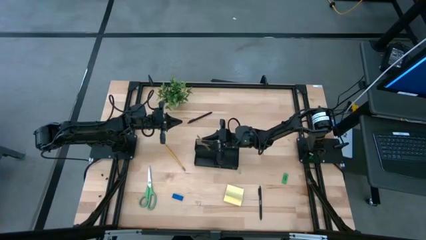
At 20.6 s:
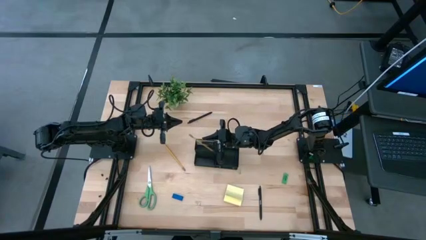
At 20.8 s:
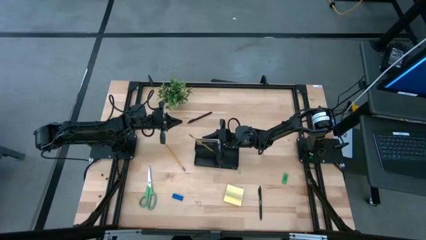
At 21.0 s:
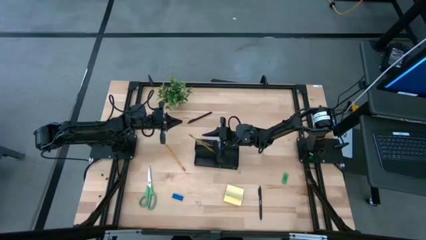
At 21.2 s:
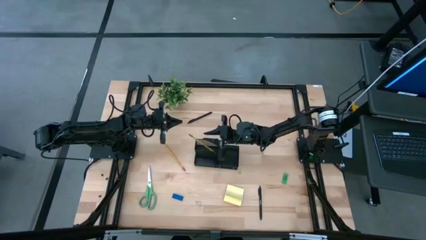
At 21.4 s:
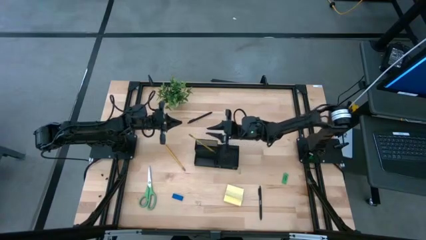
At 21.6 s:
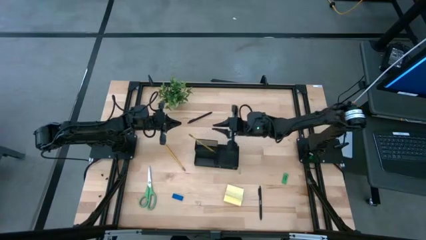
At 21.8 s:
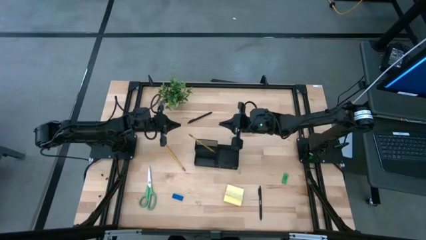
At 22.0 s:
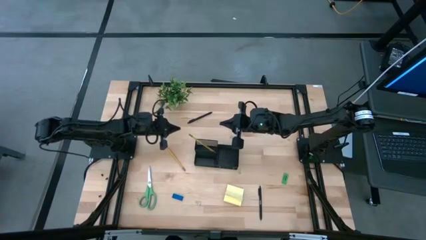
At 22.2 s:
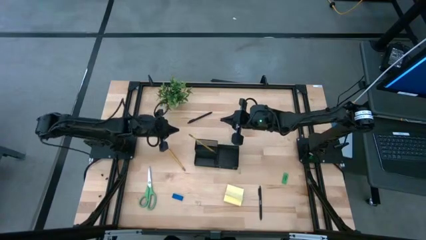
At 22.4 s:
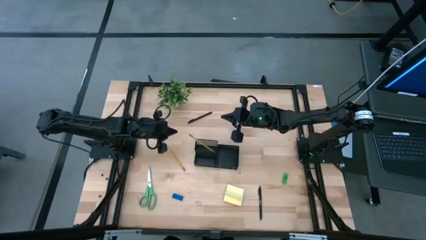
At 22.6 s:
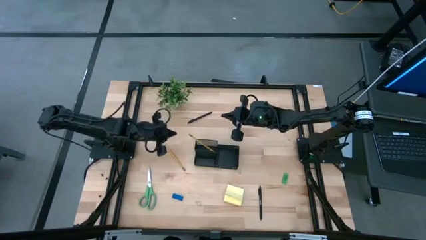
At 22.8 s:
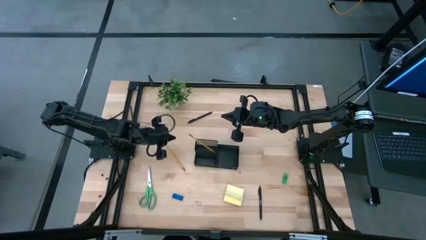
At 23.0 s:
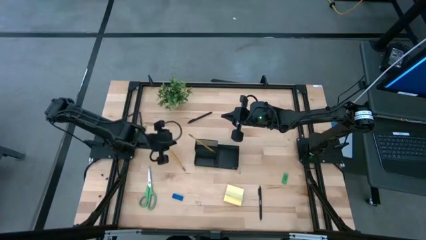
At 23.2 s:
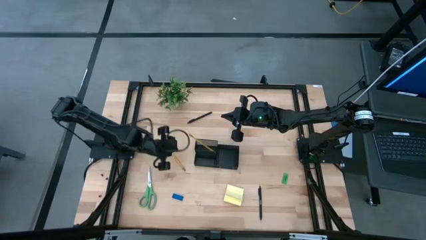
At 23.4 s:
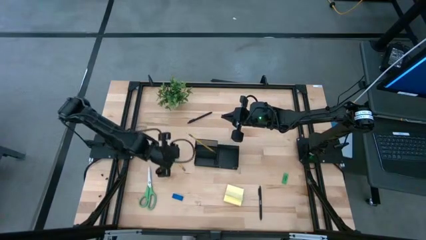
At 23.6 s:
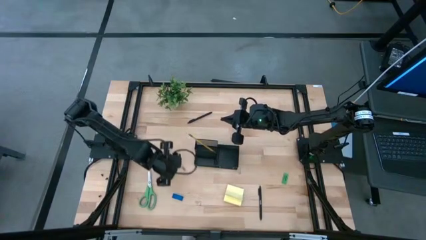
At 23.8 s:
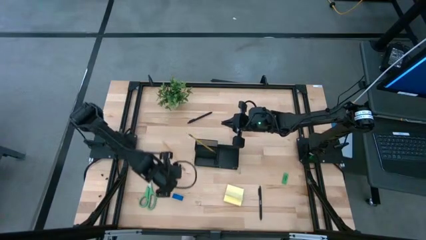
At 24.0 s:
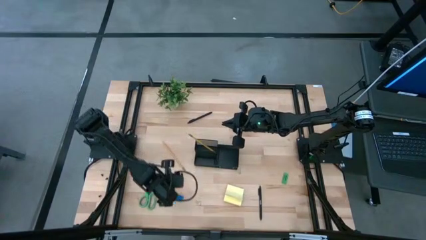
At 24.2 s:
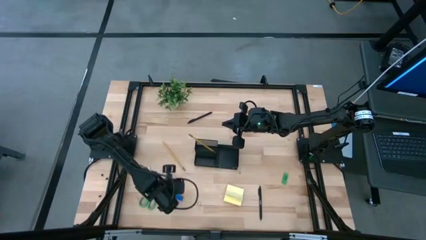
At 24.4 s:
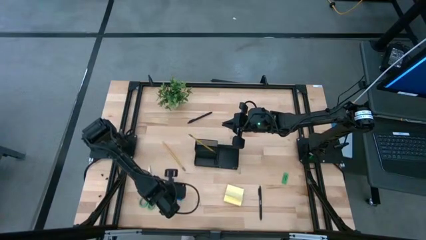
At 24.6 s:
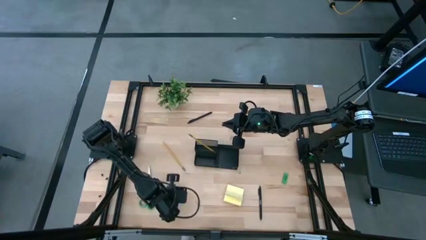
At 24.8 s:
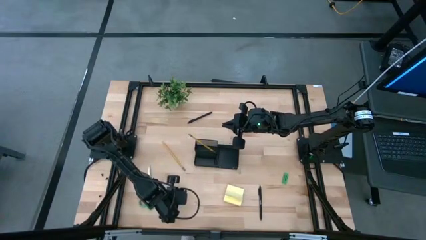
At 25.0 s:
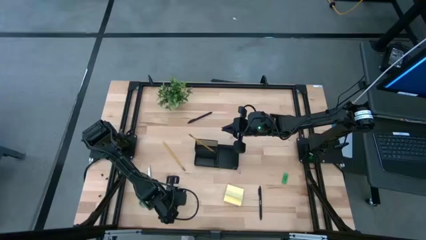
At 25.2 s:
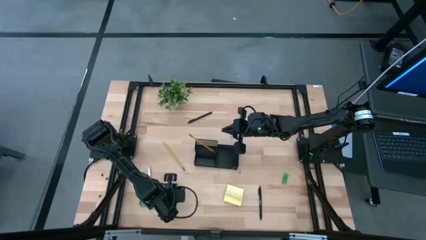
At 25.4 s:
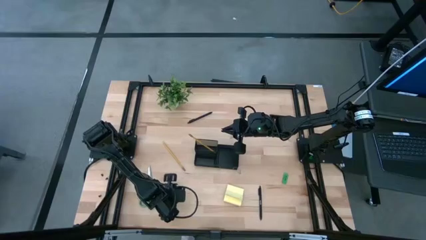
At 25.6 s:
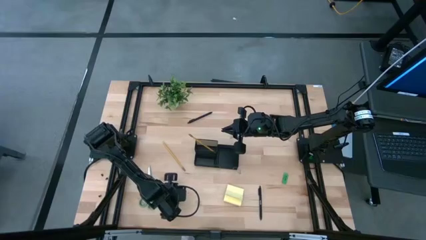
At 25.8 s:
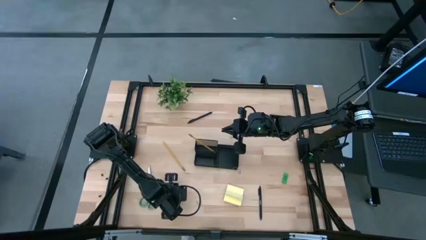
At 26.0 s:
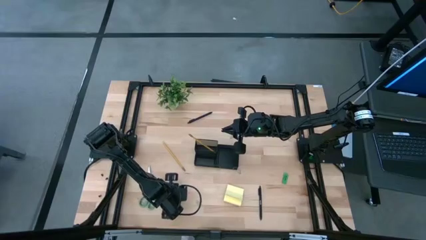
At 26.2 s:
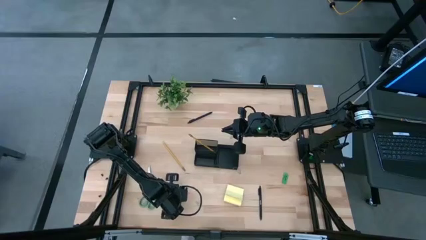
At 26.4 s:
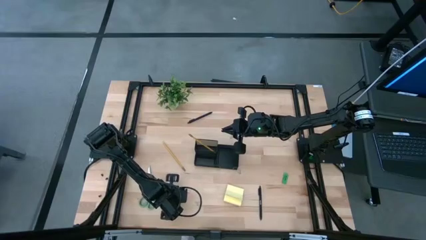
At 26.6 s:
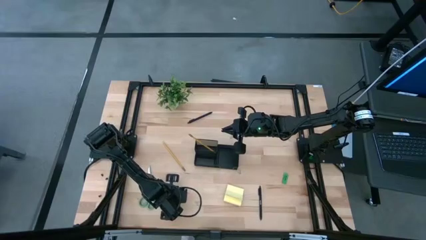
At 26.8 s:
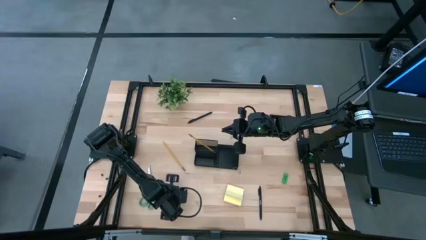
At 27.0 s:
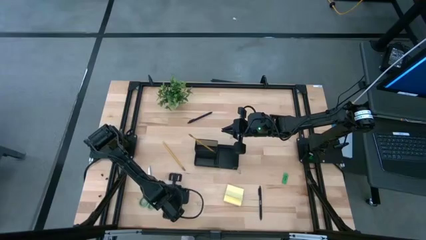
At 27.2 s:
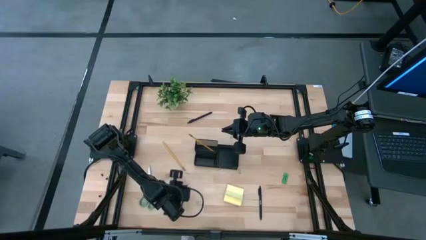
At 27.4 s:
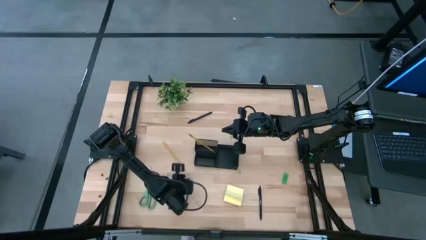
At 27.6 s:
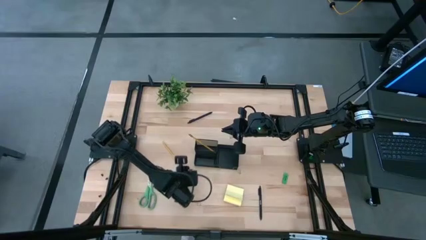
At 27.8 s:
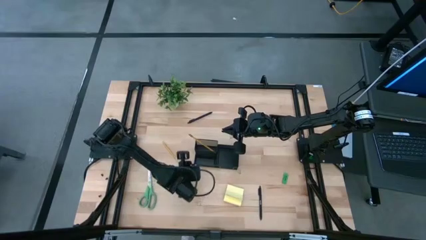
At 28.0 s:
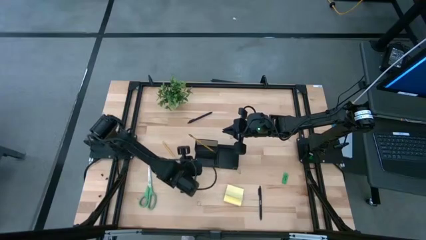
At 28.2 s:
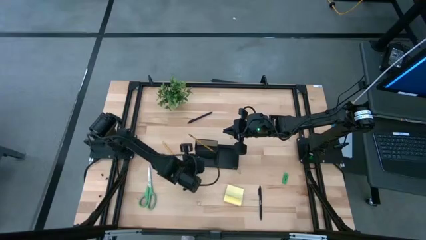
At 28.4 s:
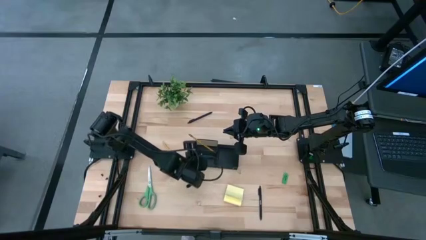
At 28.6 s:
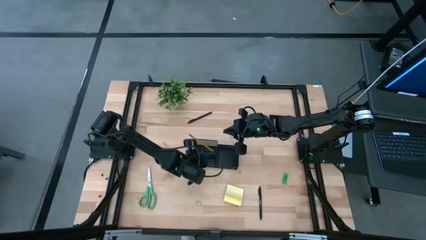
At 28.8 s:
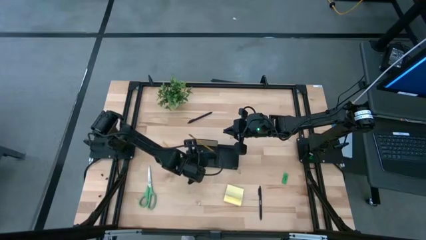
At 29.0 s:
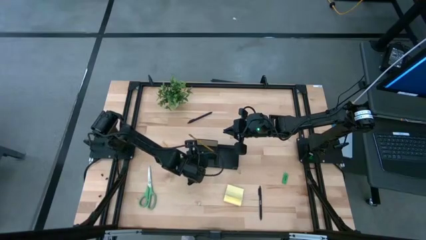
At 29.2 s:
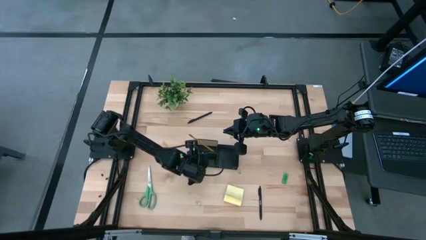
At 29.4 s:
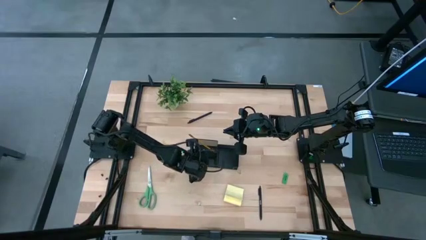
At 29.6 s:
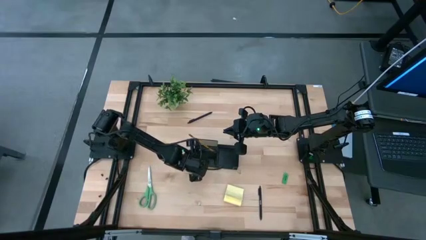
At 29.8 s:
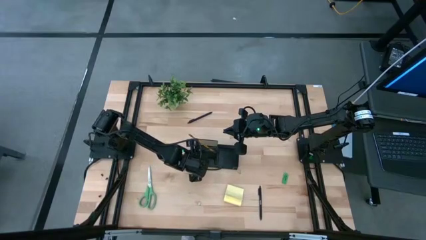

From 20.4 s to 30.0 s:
Task: Pick and place office supplies into organizer
Put the blue eraser into the black desk organizer

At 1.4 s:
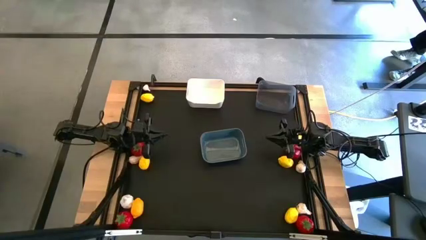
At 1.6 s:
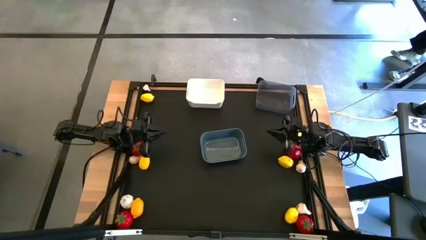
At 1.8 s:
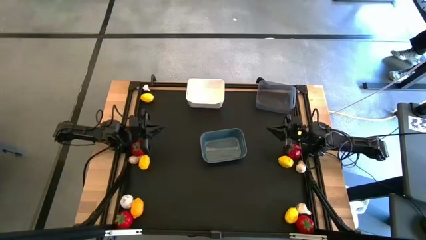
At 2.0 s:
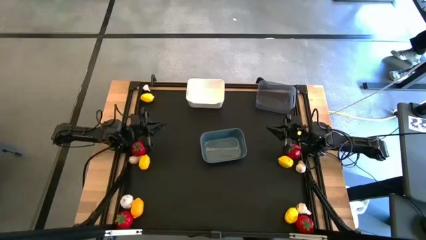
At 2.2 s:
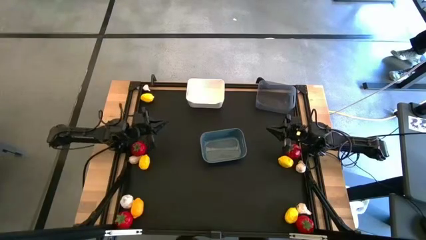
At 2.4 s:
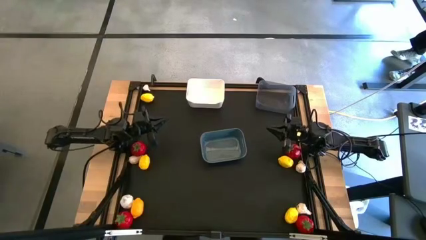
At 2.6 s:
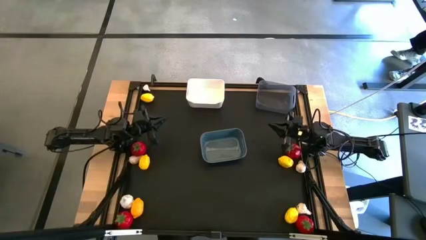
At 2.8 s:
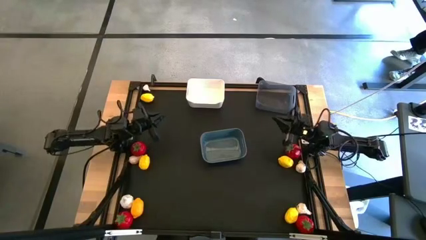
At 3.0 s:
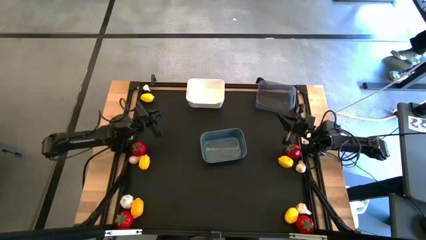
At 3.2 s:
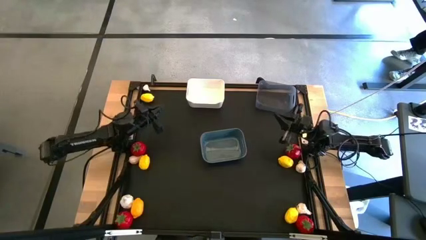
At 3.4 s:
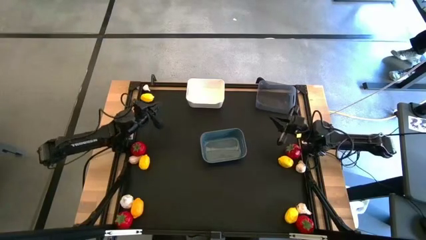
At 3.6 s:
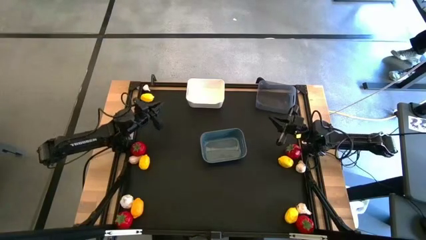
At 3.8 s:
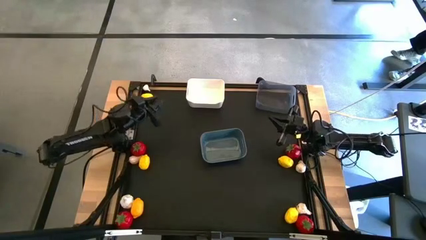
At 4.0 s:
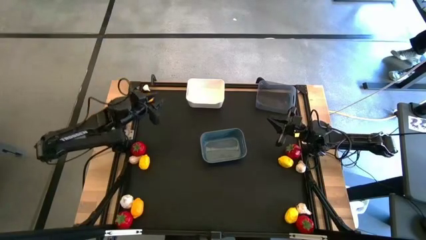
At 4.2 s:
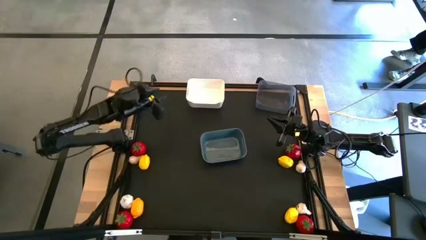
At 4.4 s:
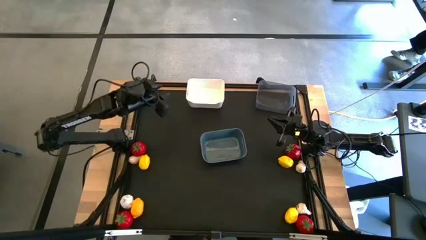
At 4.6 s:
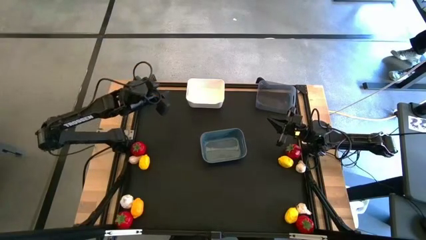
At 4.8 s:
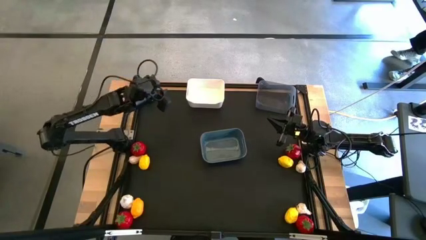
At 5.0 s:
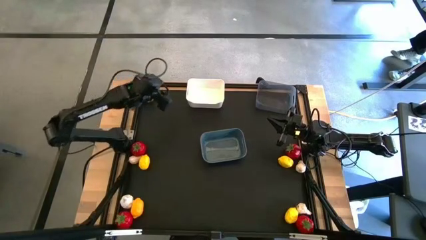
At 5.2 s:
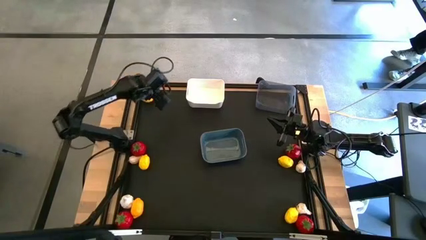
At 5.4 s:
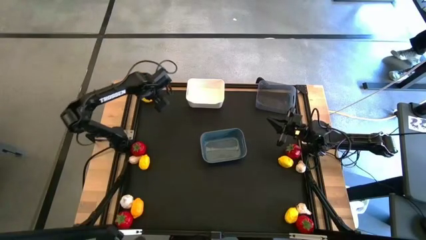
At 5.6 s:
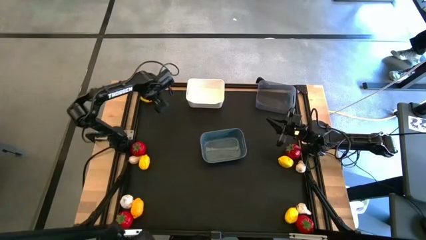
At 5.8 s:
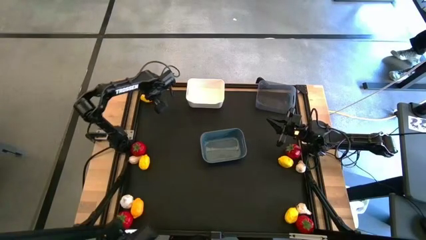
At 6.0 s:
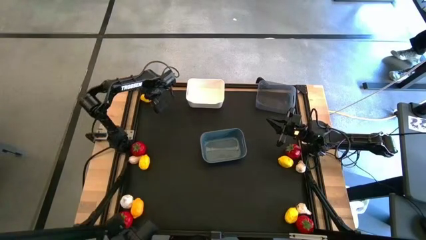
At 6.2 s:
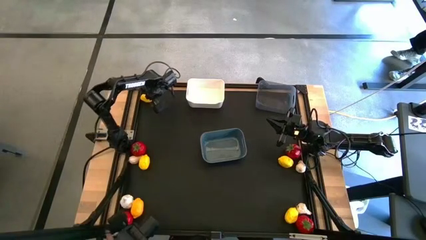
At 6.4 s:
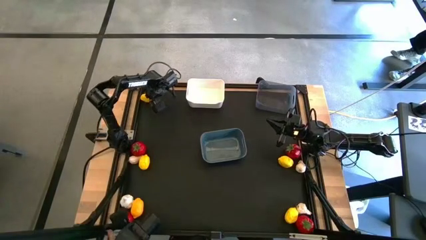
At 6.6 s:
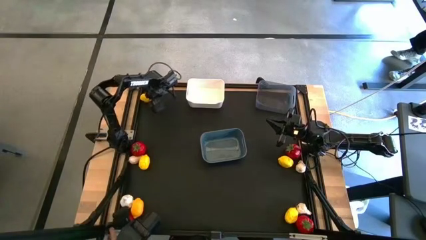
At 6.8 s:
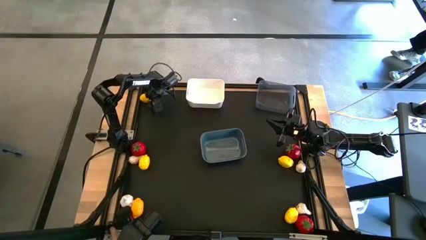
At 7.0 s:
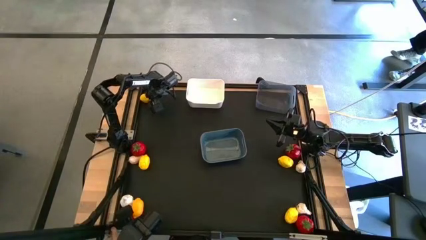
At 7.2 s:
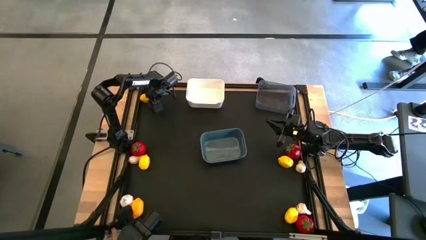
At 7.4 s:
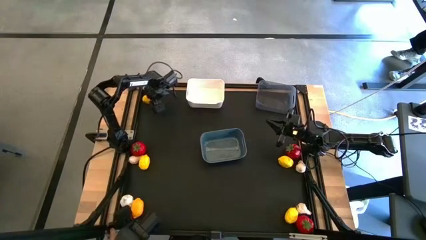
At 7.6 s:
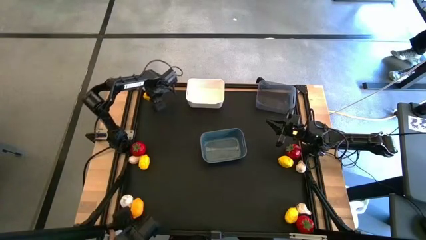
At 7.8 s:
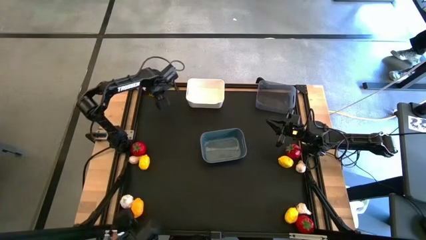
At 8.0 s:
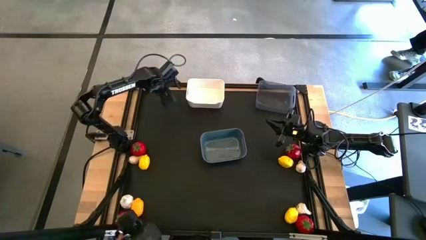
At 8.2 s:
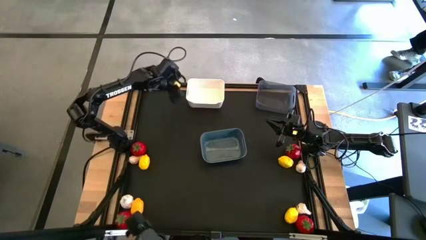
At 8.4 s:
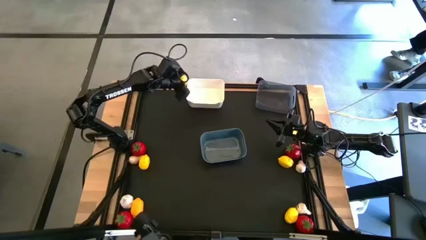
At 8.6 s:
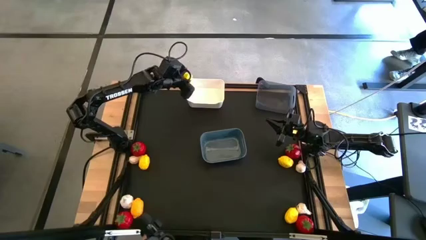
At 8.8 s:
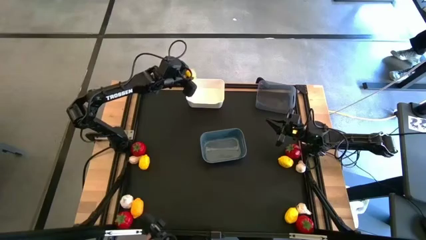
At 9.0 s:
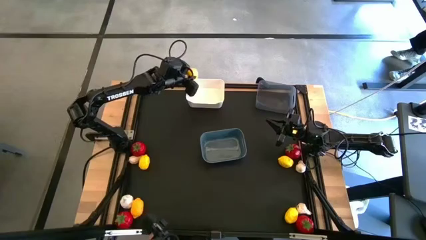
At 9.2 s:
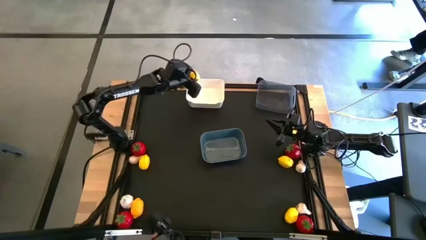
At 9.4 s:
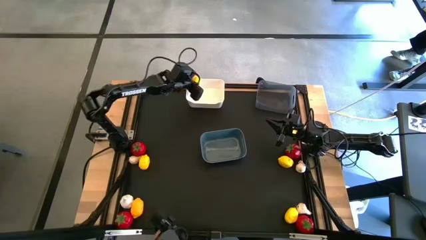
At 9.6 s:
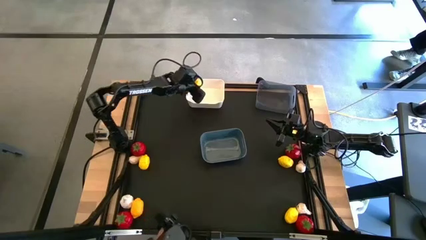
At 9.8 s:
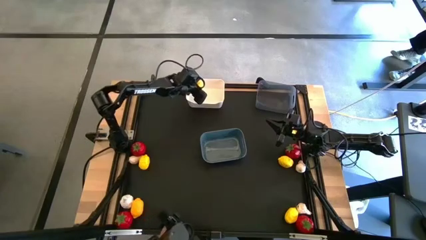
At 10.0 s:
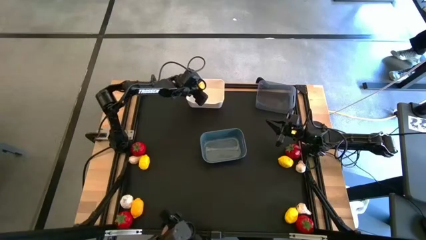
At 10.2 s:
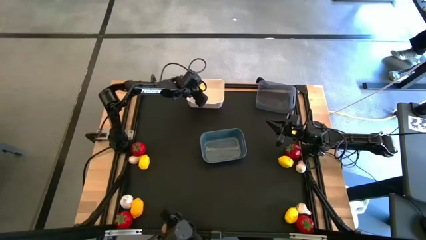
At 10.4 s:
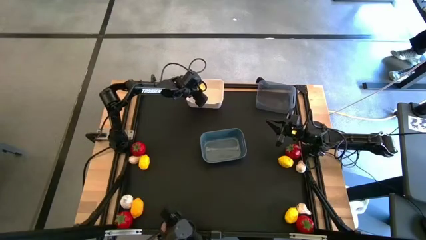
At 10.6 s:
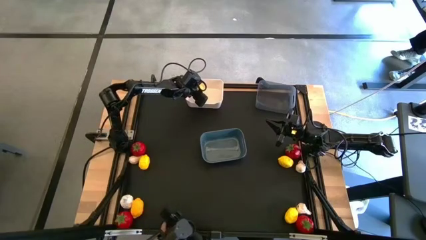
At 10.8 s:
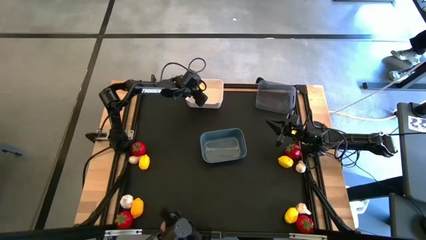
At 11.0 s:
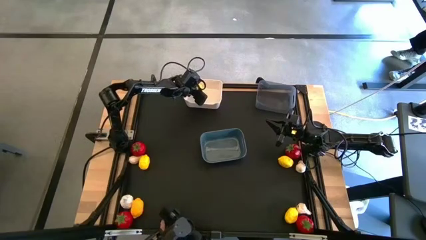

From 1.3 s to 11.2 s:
Task: Sort produce into baskets
Put the yellow lemon into the white bin
